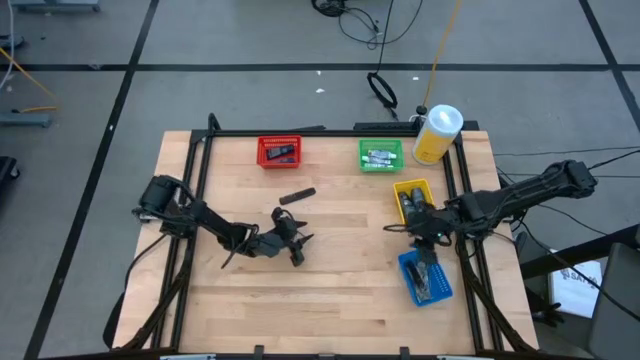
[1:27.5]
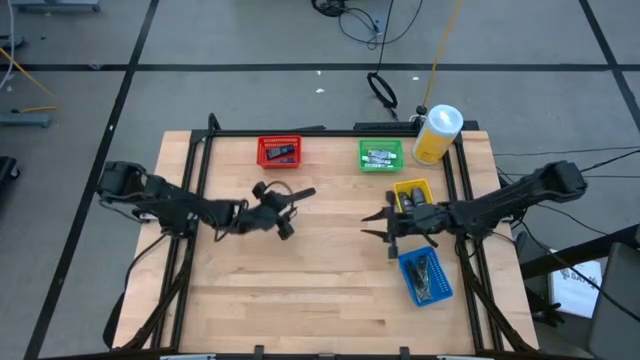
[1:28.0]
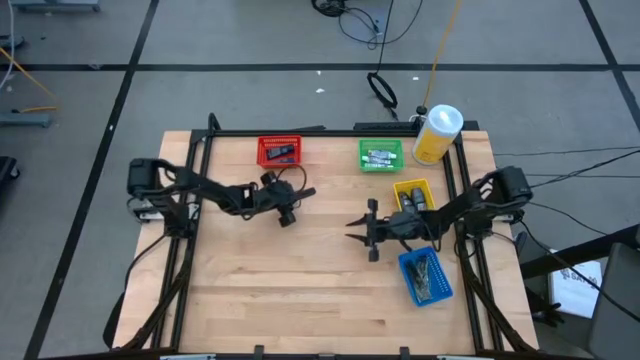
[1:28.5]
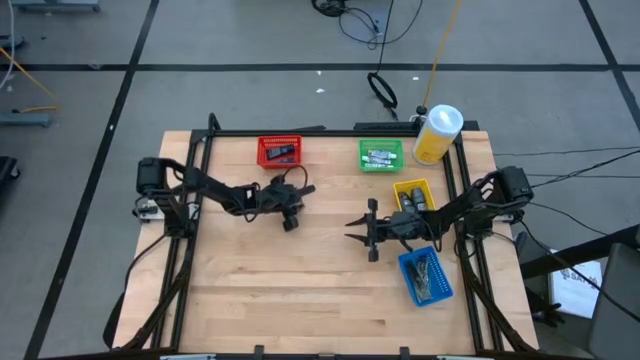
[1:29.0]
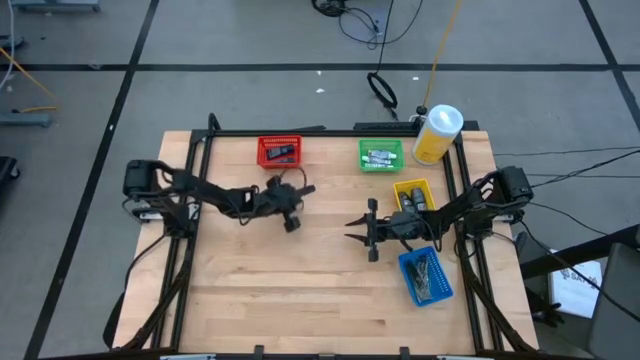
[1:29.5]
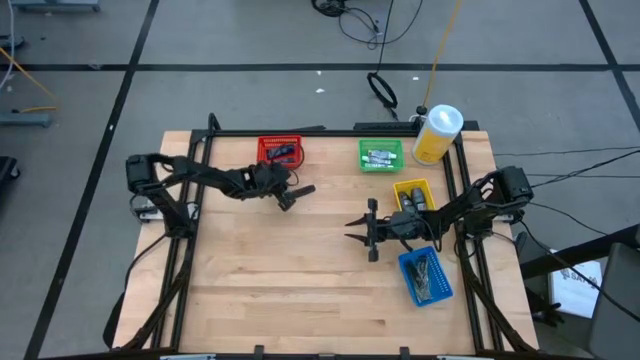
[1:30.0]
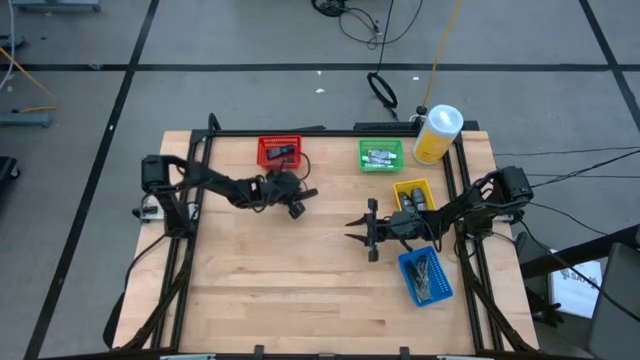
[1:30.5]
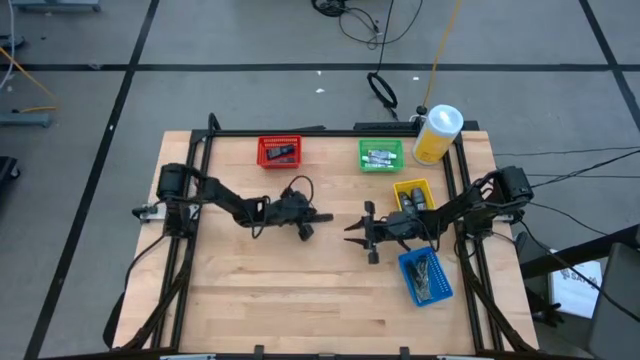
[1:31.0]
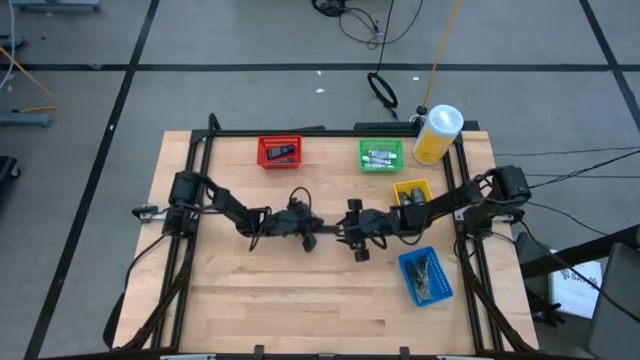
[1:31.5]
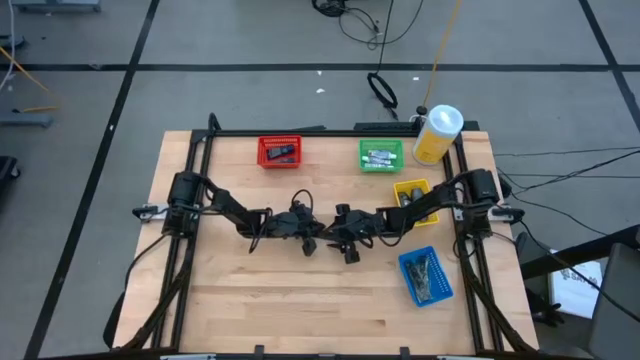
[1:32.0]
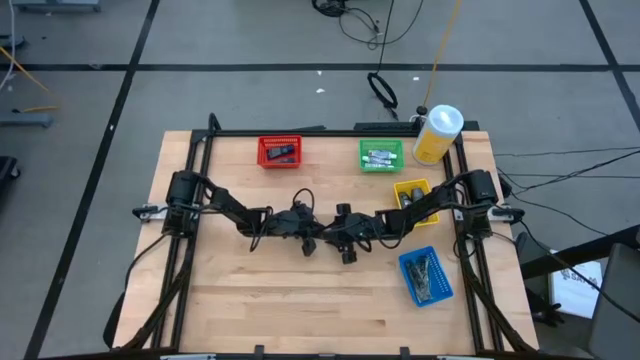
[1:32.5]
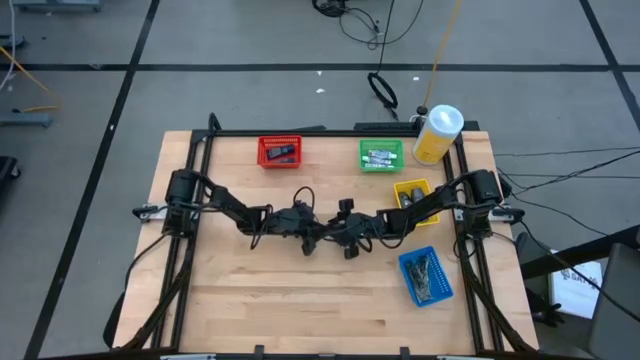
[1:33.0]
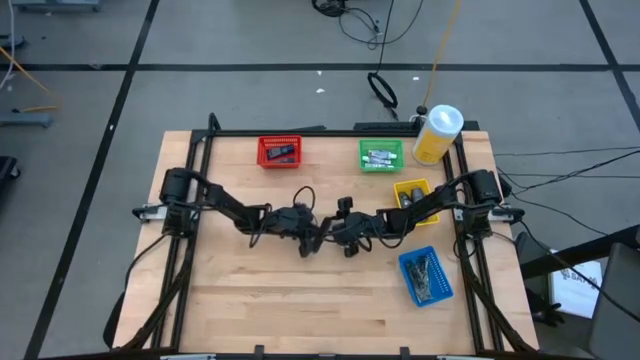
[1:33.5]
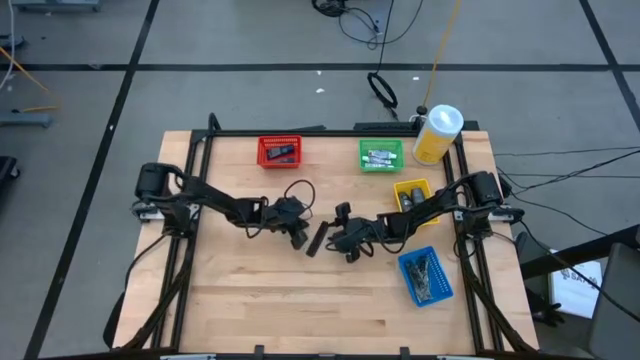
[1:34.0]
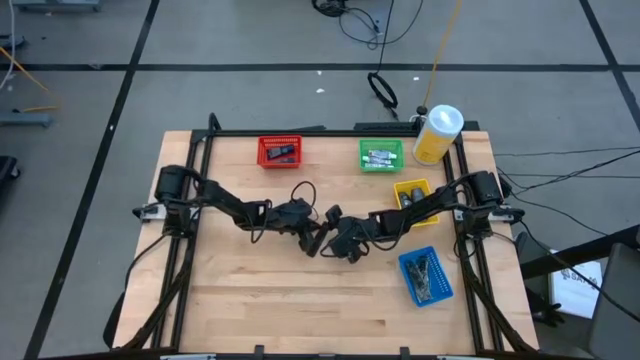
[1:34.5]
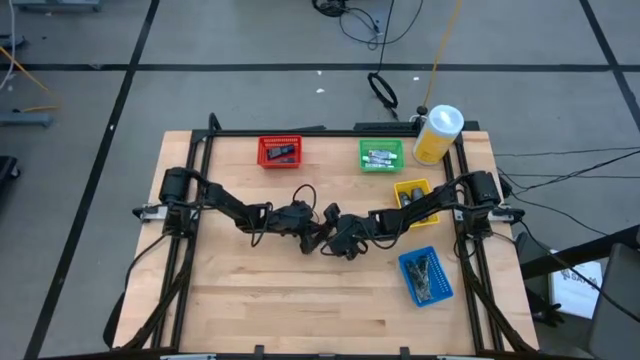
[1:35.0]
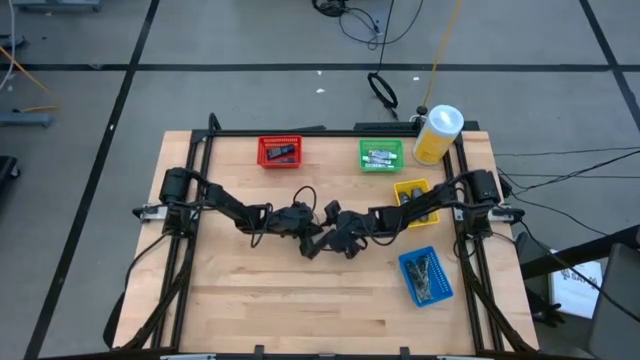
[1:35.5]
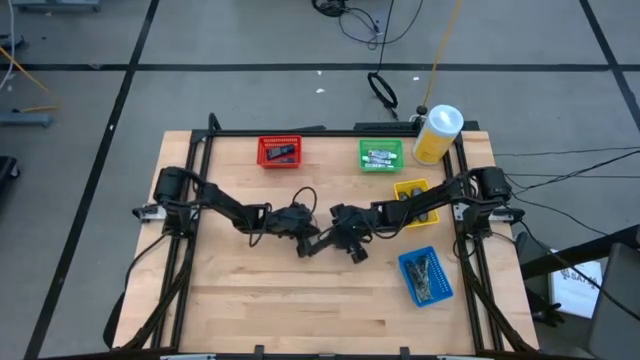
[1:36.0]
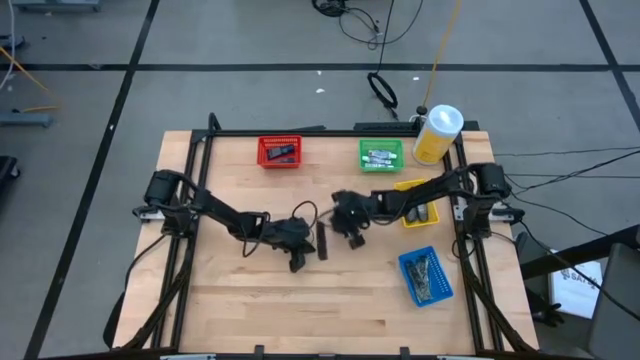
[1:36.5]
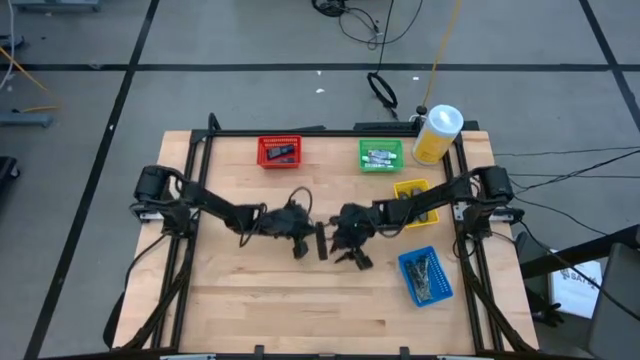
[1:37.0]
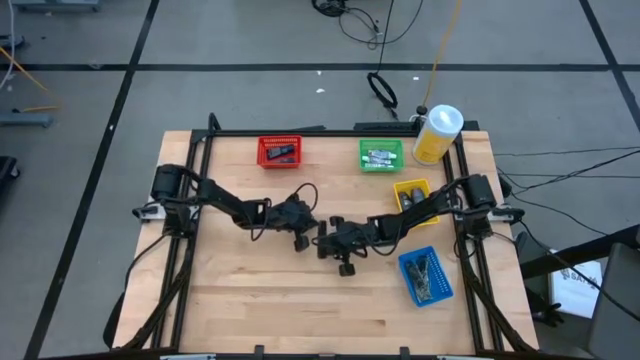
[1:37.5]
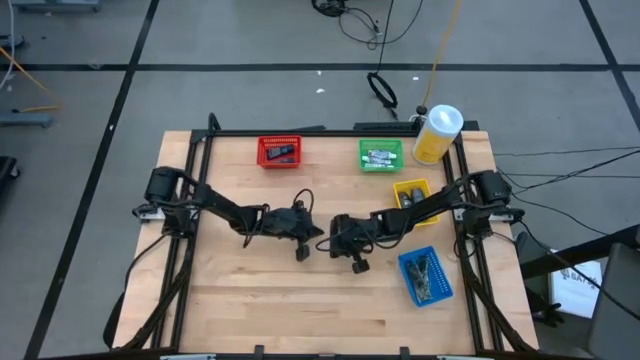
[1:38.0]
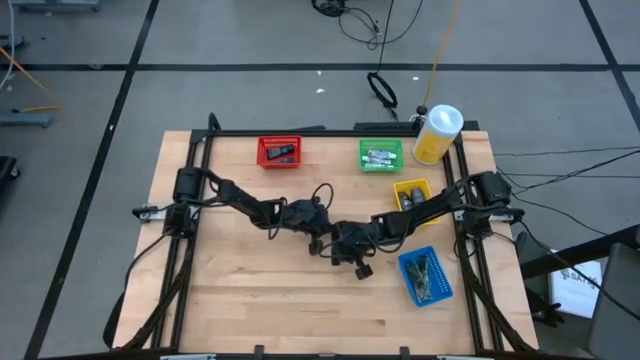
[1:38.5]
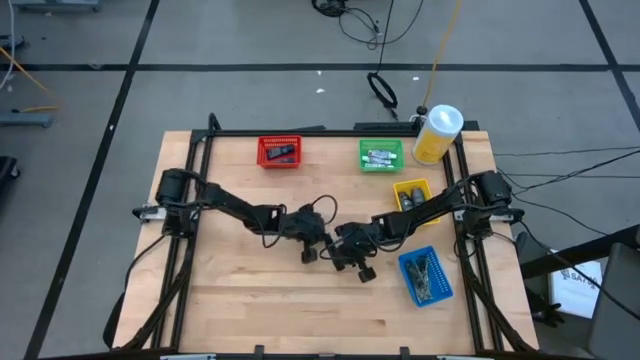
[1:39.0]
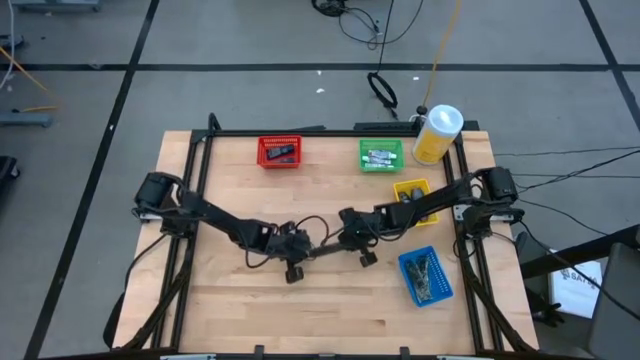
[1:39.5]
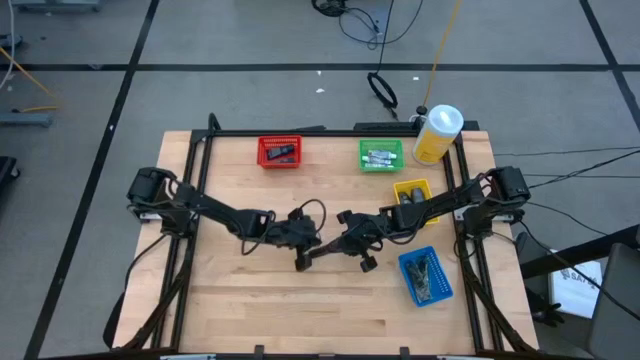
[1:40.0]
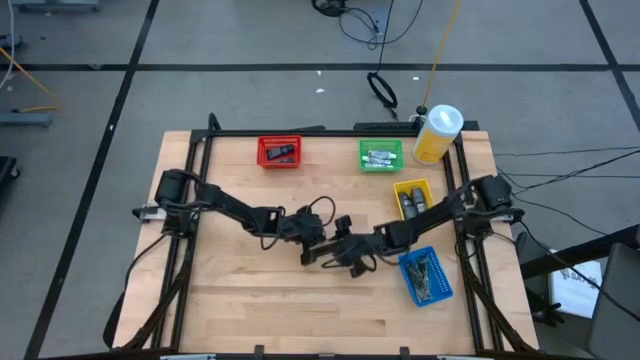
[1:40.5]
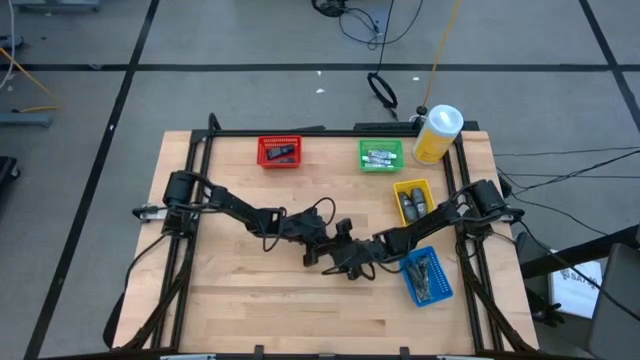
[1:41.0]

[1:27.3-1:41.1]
Task: Pick & Place Travel size toiletries
Put the black comb into the blue bin

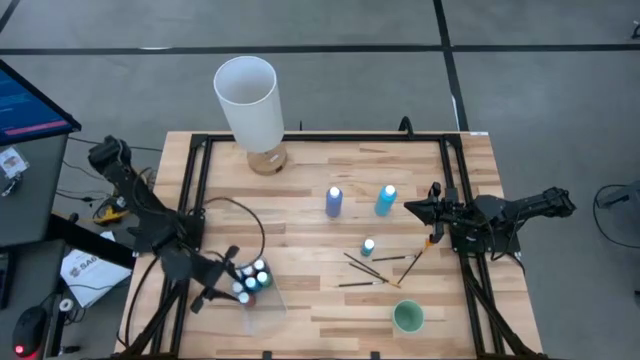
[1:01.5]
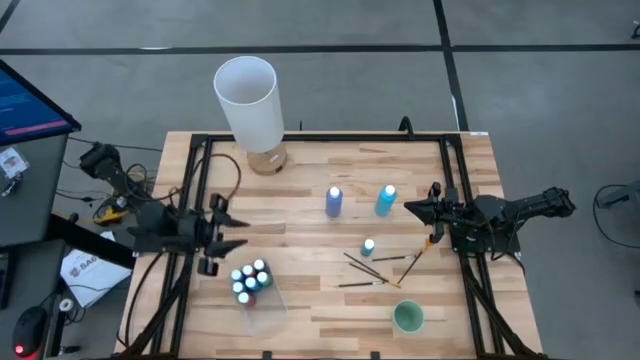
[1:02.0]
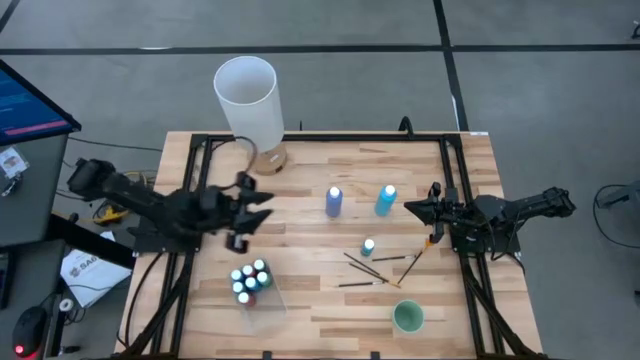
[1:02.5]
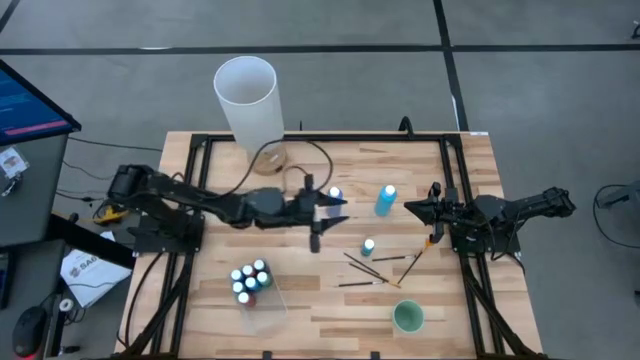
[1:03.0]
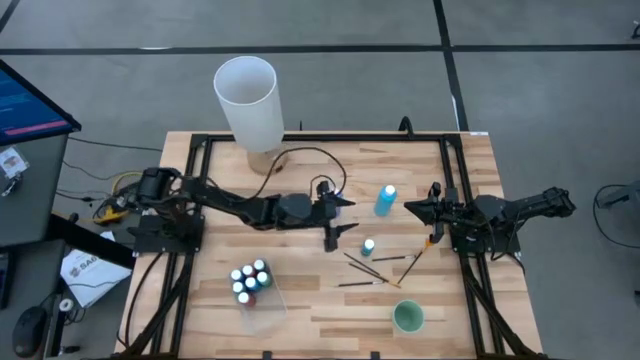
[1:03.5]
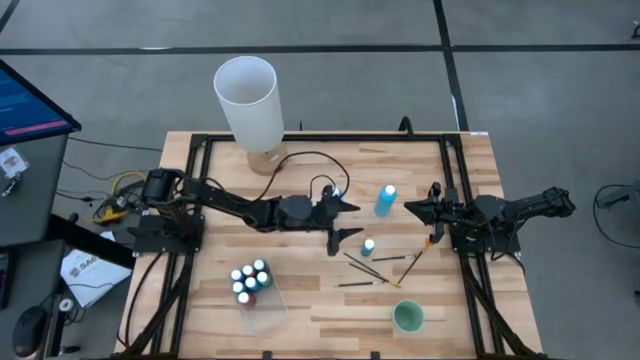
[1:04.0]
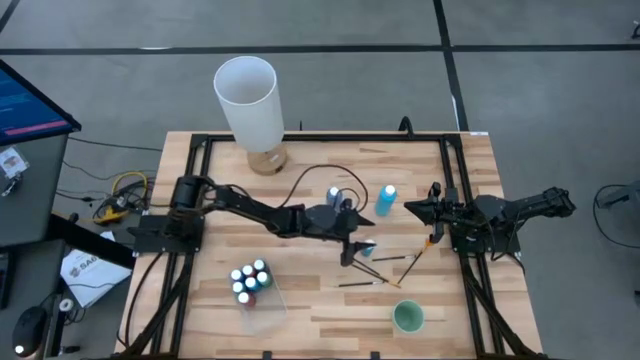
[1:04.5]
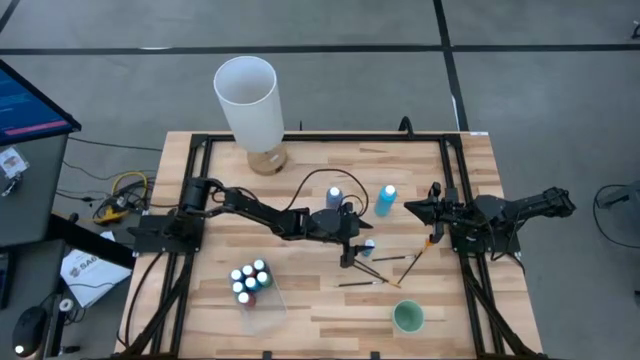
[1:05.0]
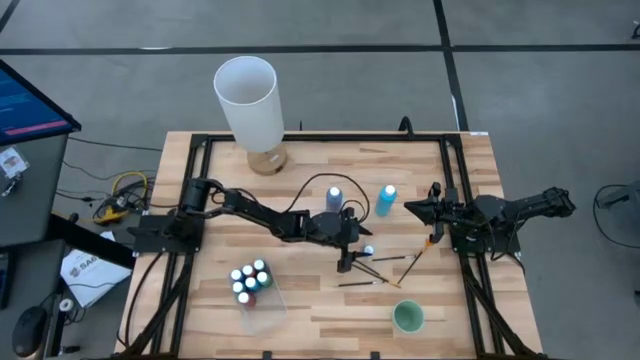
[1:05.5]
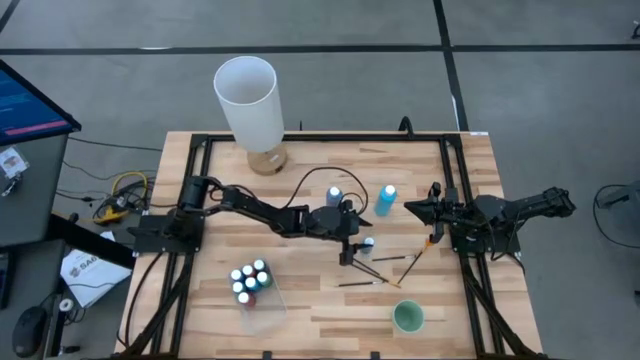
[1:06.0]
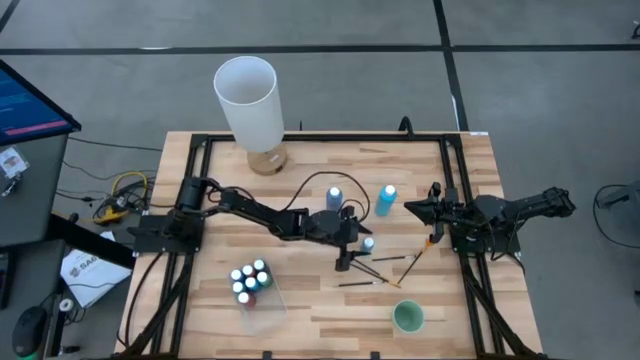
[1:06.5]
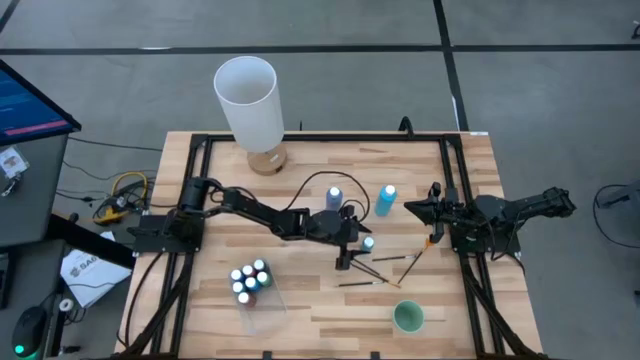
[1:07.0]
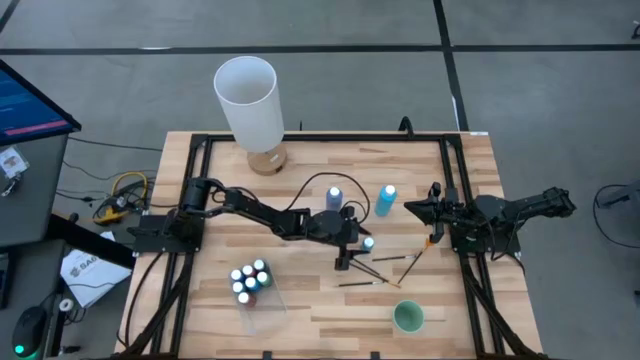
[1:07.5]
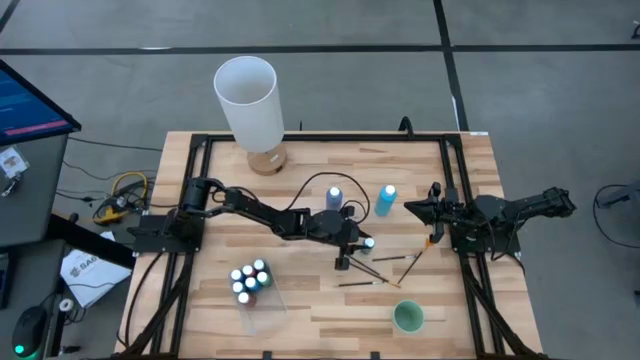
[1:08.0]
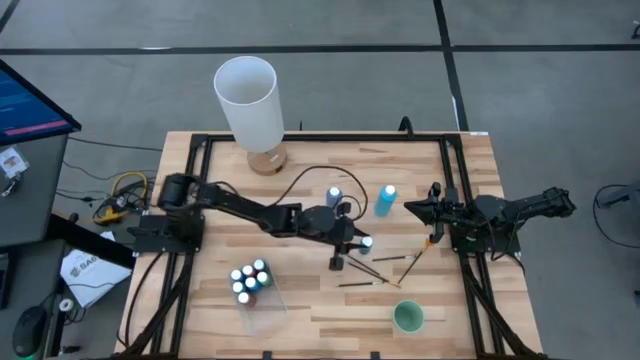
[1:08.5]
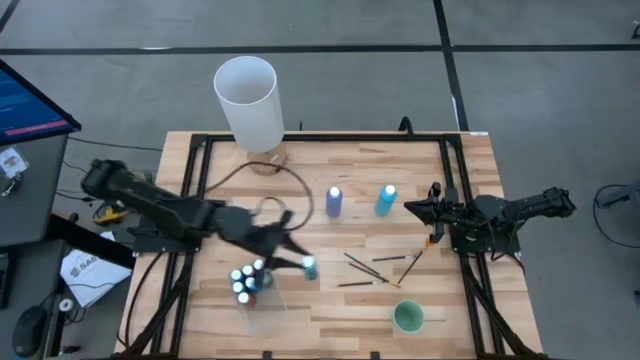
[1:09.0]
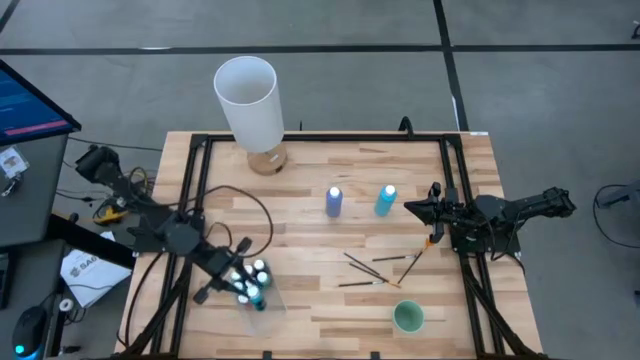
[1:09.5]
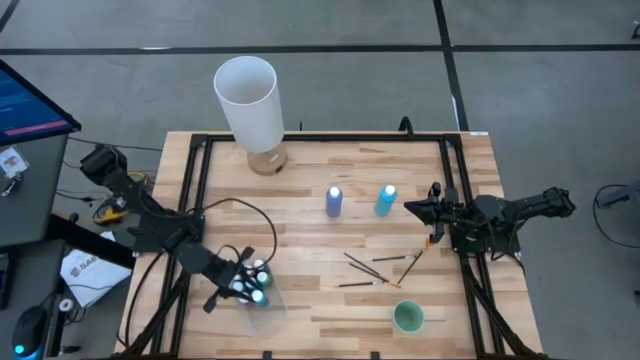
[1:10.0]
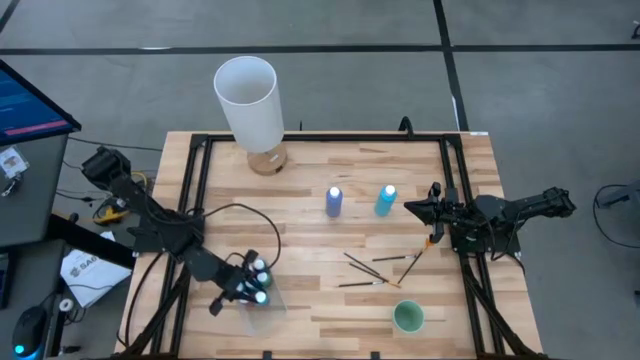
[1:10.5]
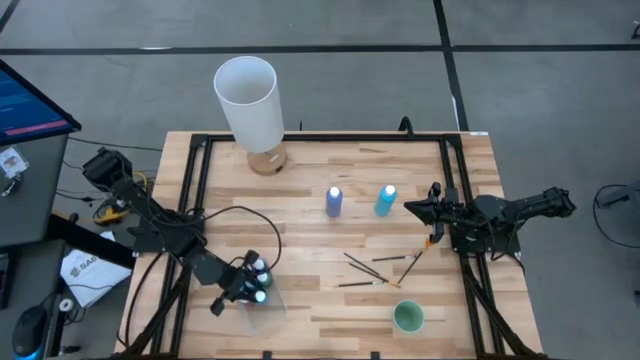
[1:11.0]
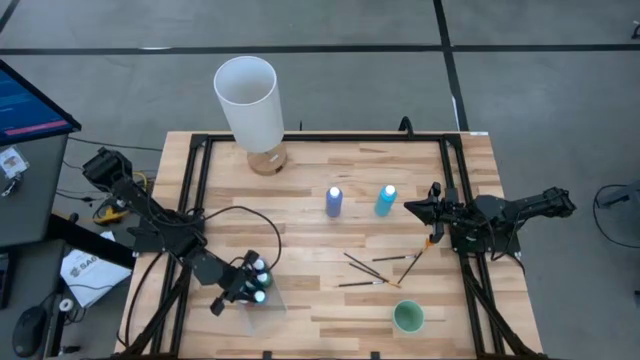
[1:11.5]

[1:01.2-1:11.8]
Task: Pick & Place Paint Supplies
Put the light blue paint bottle into the transparent bin
